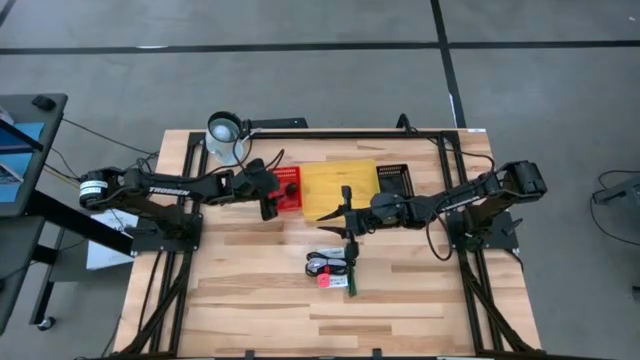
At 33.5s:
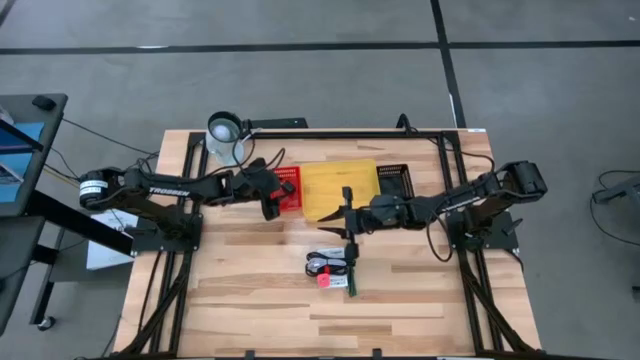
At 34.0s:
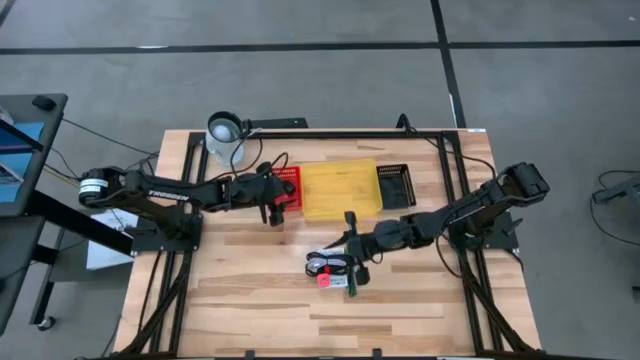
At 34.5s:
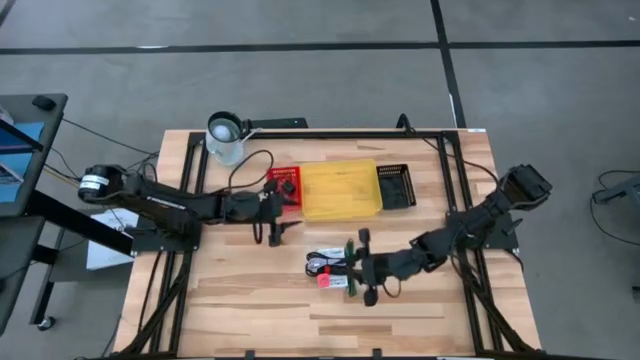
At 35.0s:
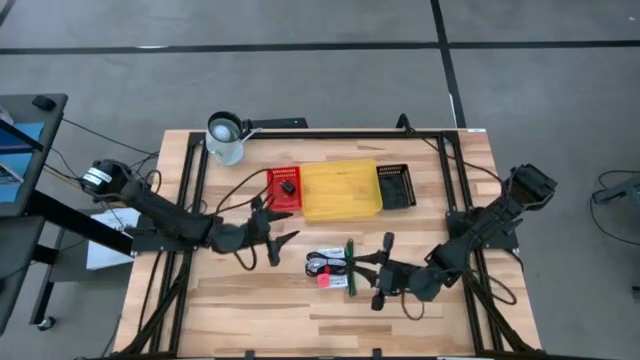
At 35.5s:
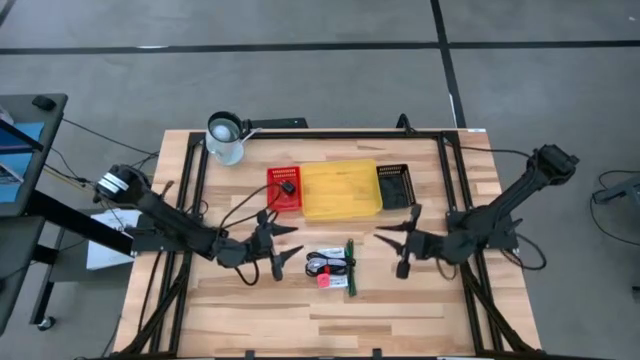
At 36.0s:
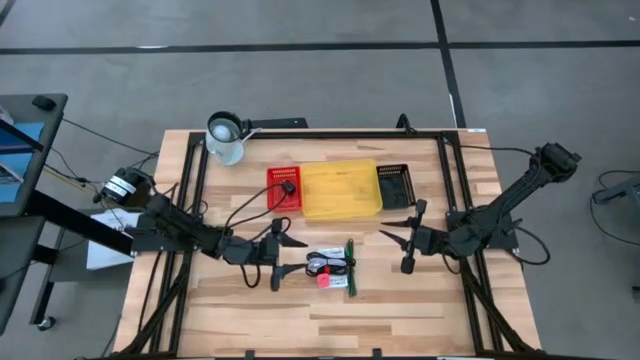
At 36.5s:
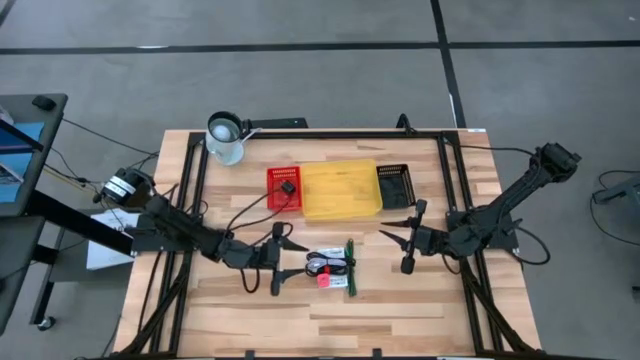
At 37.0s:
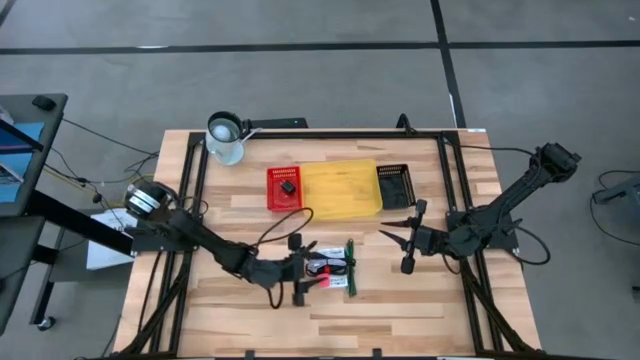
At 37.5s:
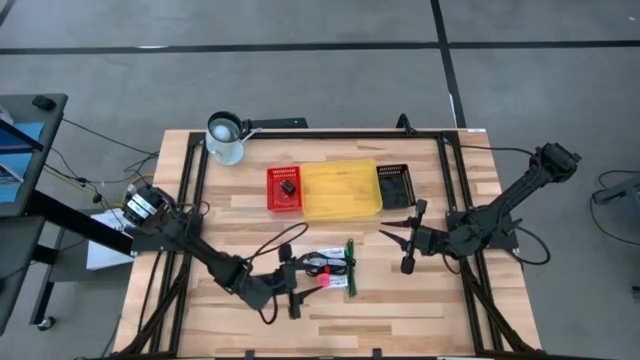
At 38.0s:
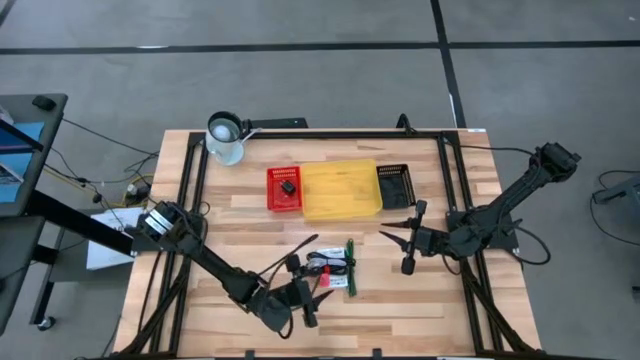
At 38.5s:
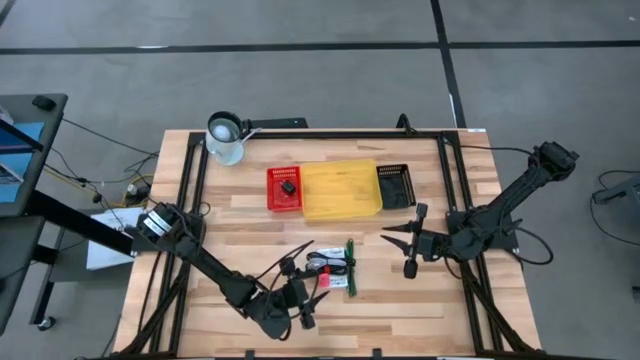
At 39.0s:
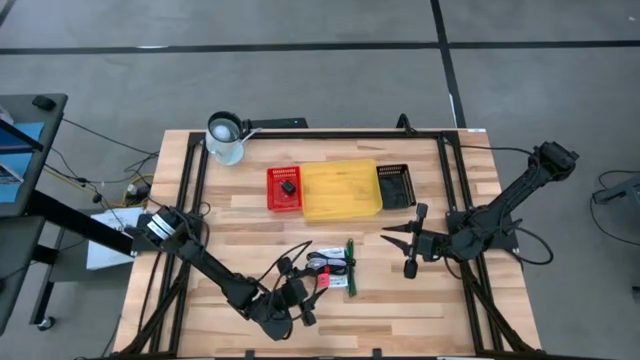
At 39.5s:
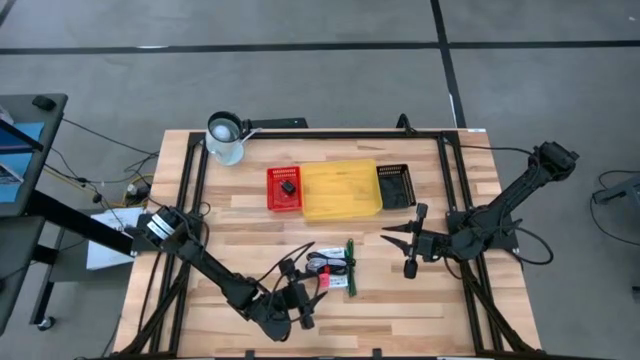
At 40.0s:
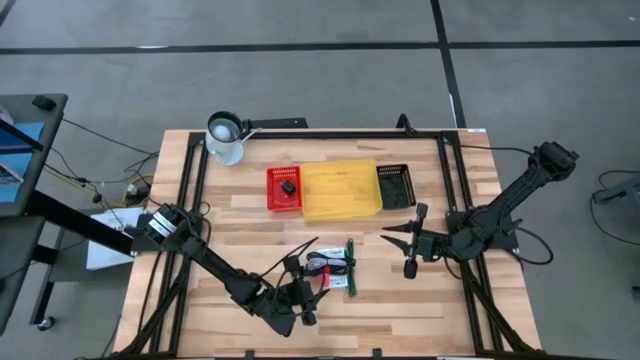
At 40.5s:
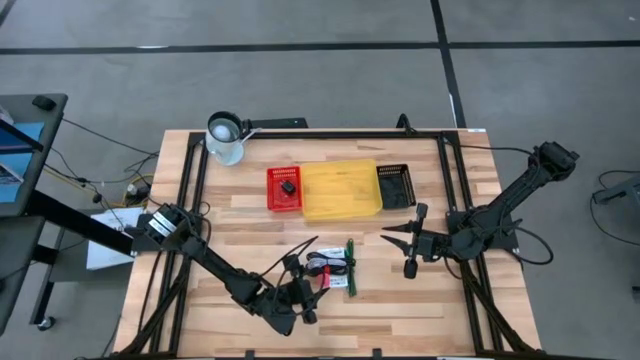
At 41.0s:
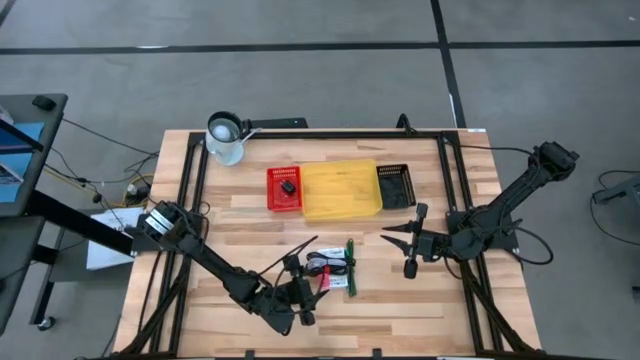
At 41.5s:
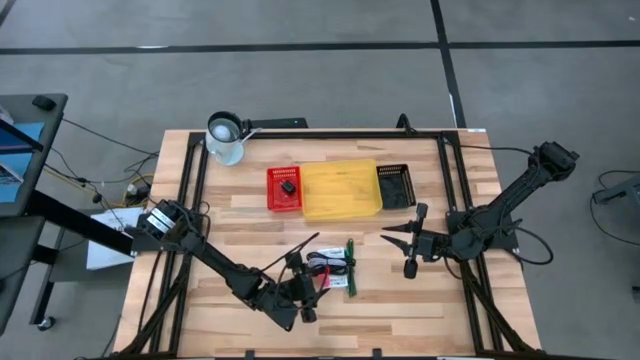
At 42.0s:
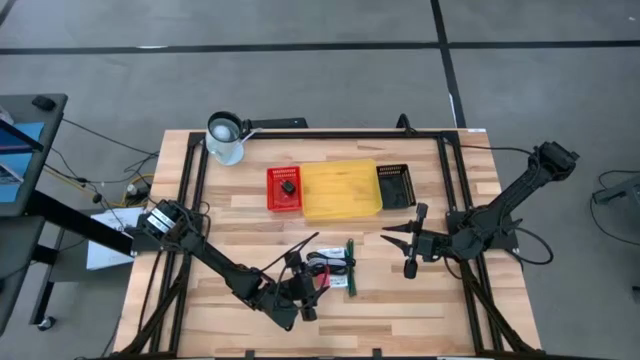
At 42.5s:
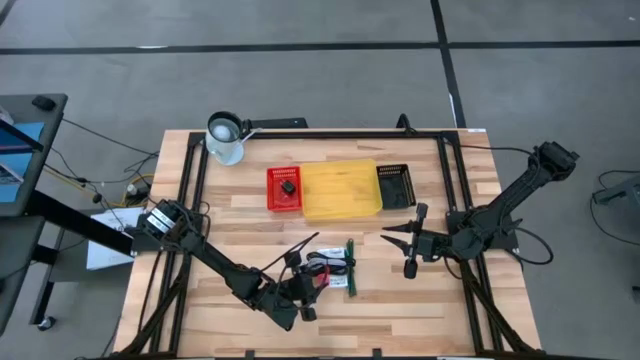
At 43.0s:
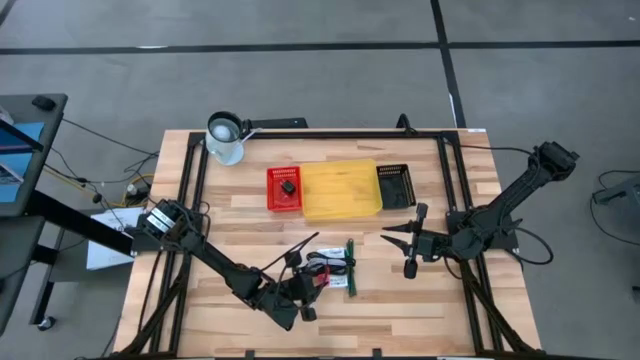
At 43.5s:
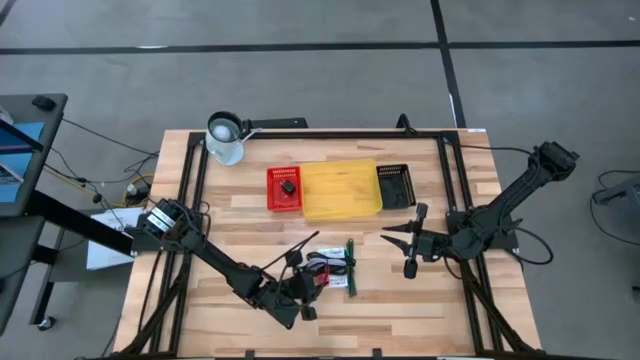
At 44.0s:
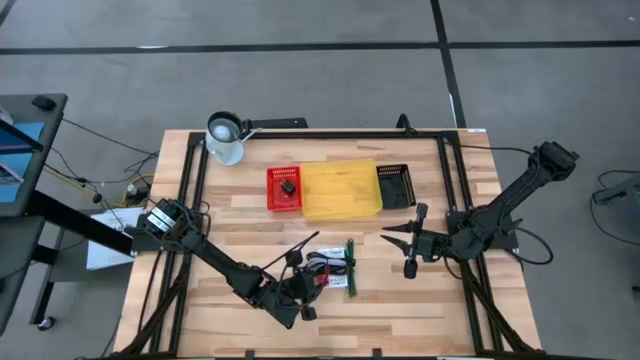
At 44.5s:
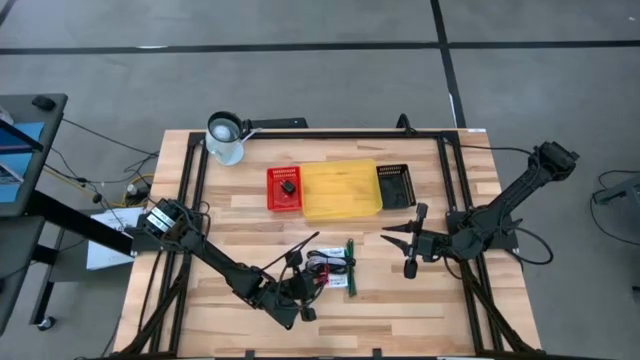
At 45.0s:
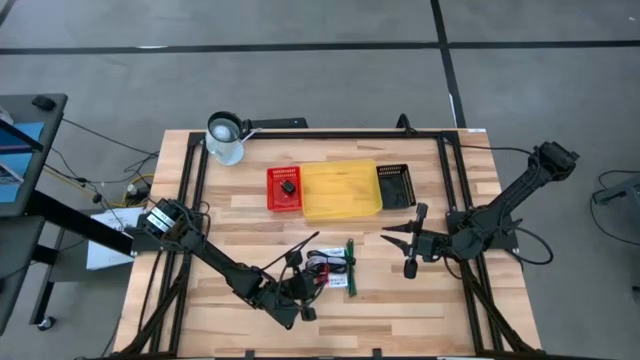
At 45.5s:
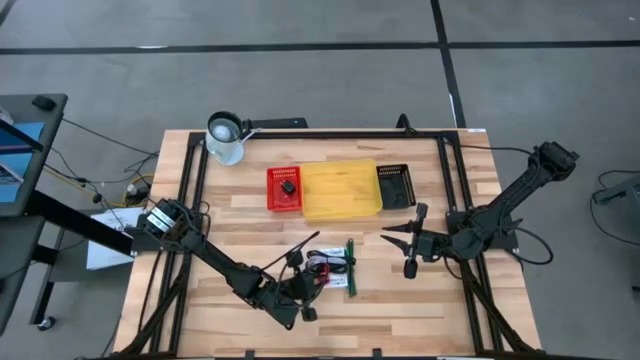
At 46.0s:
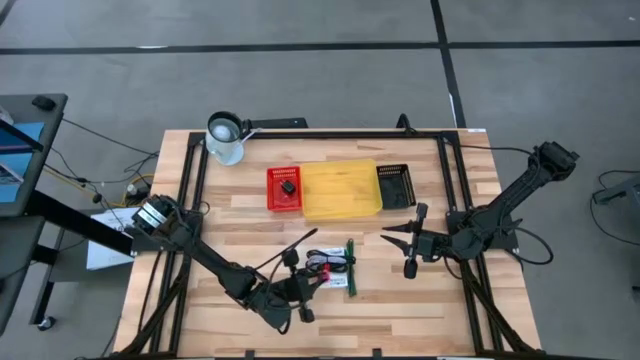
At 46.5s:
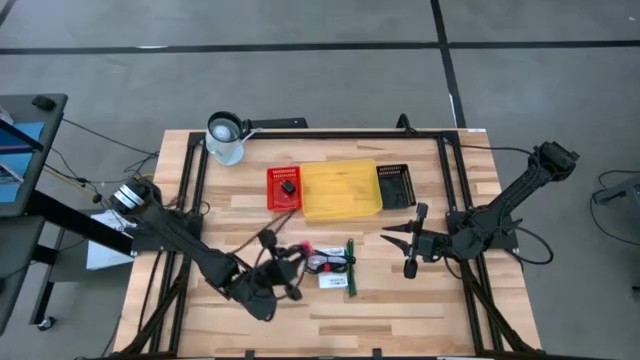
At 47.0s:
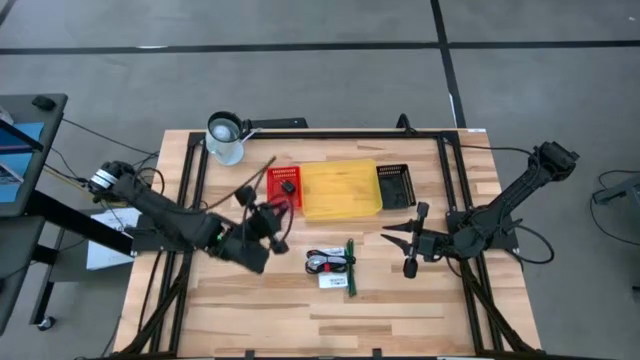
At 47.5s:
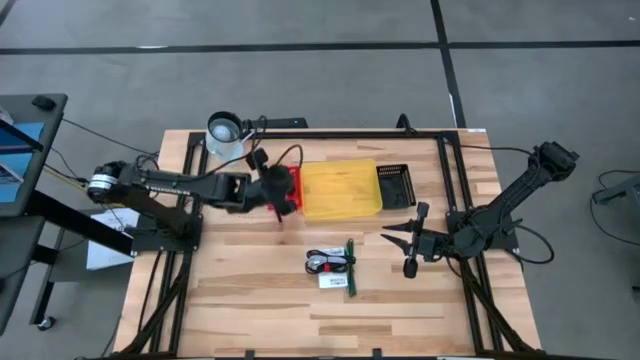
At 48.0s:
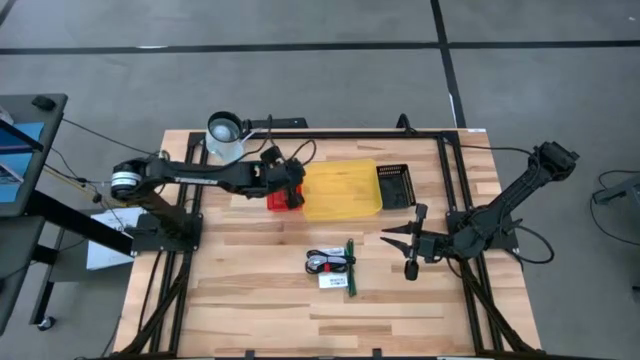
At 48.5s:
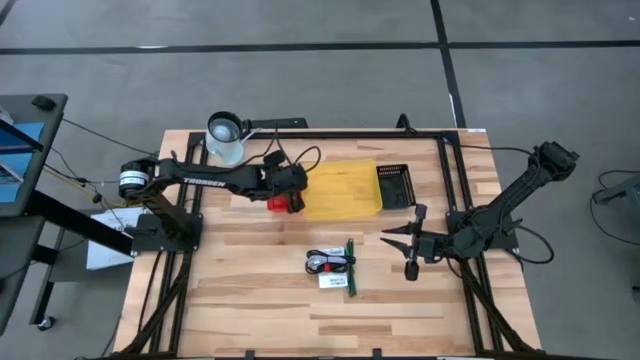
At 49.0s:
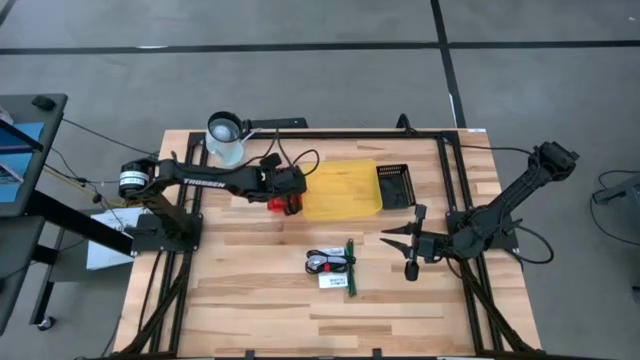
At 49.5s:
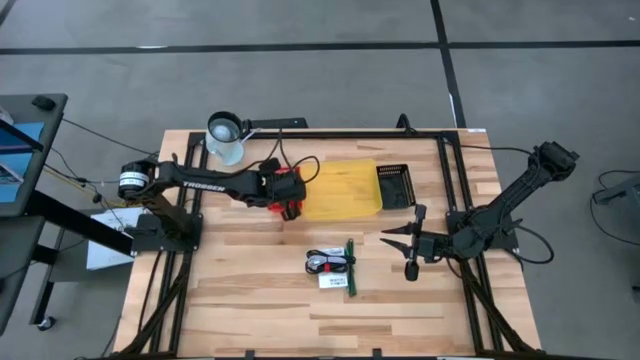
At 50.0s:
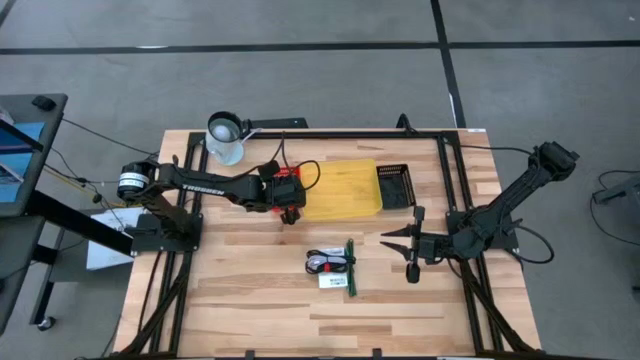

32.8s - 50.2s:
Task: Pick and place items into bin
Put the pink charger adapter into the red bin

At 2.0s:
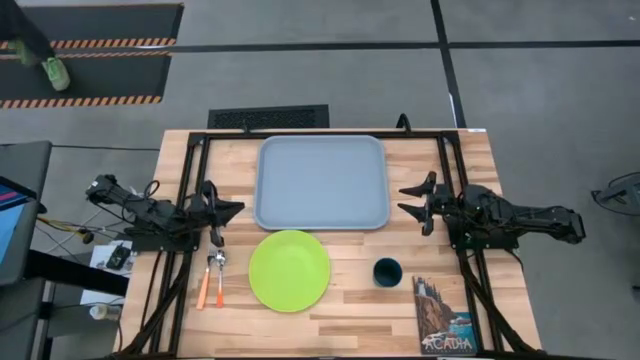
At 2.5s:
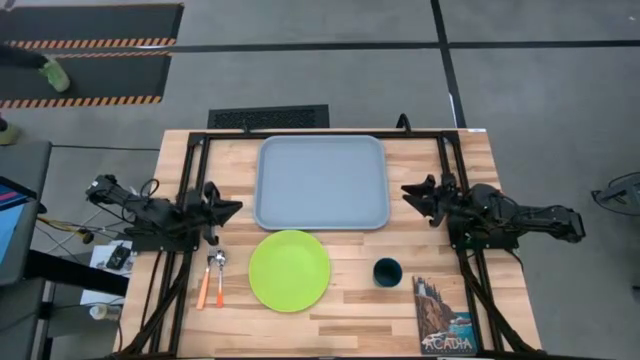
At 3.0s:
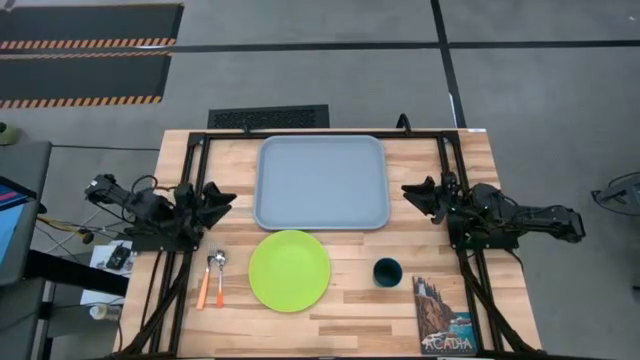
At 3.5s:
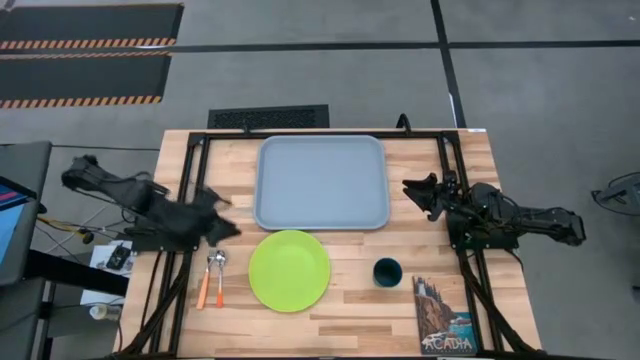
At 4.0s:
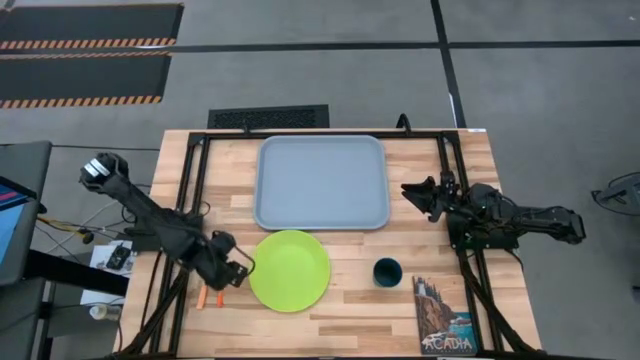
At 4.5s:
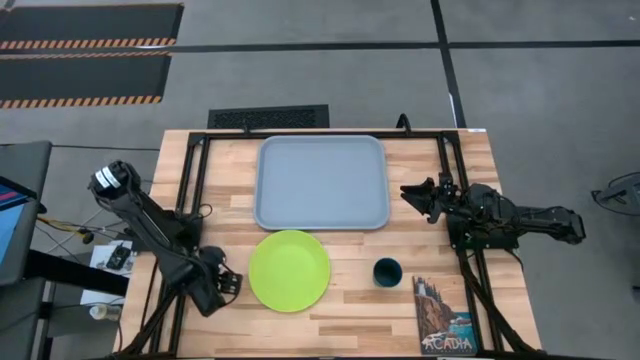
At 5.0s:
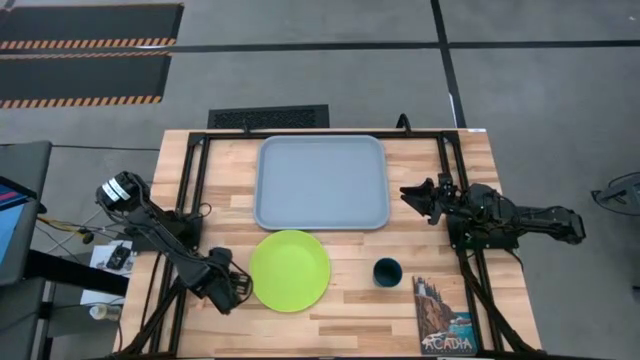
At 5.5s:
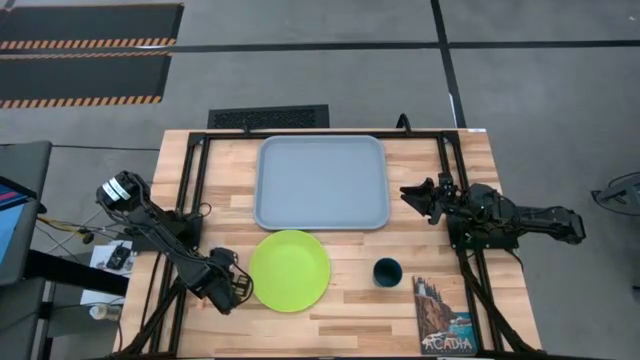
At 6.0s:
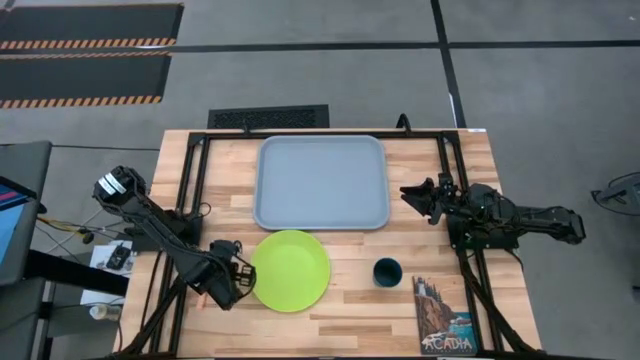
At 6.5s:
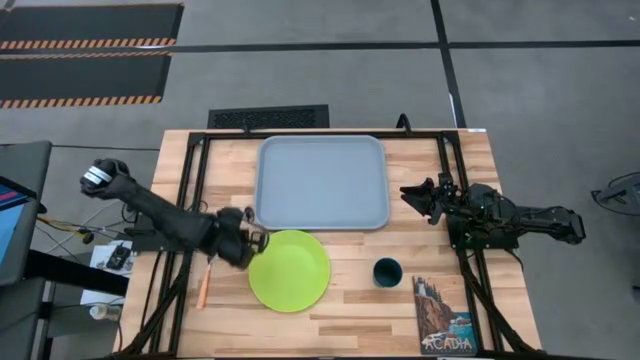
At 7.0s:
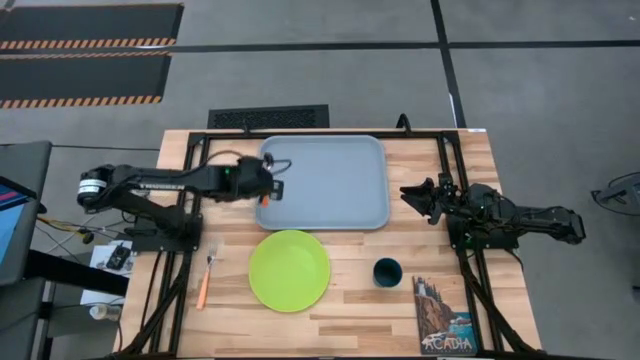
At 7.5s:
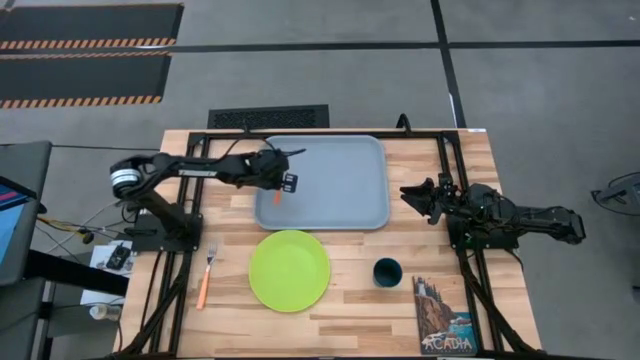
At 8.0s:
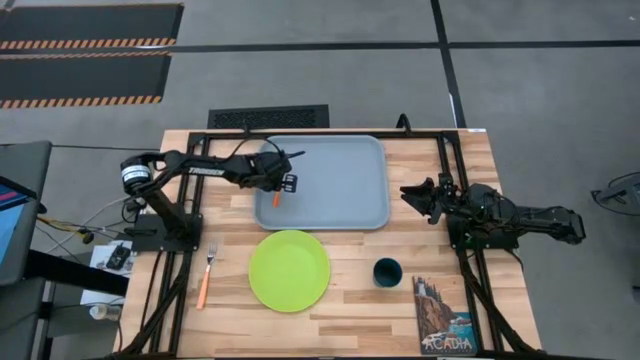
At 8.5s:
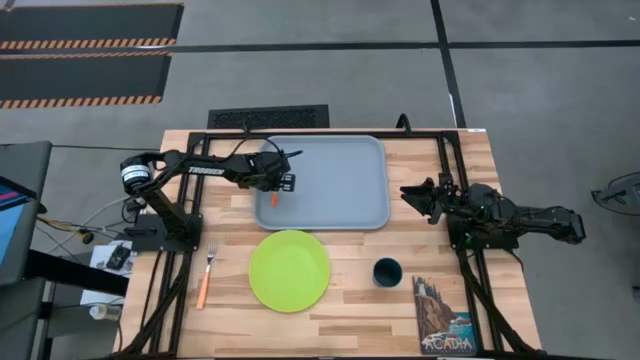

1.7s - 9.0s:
Task: Pick and place plate/cup/fork/spoon on tray
Put the orange spoon on the gray tray
